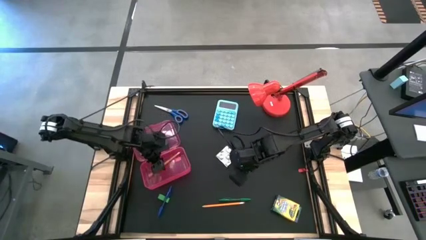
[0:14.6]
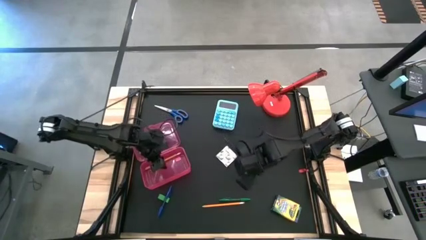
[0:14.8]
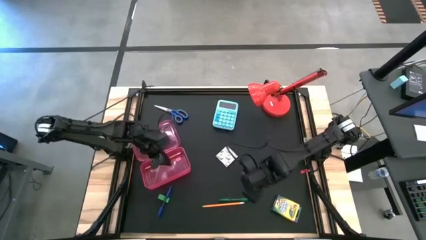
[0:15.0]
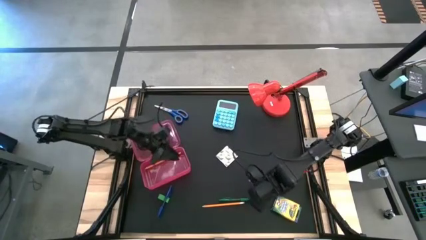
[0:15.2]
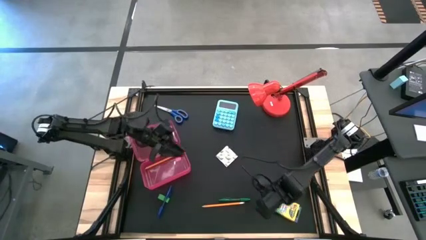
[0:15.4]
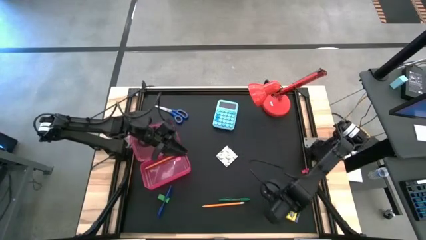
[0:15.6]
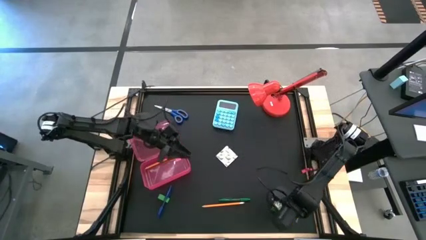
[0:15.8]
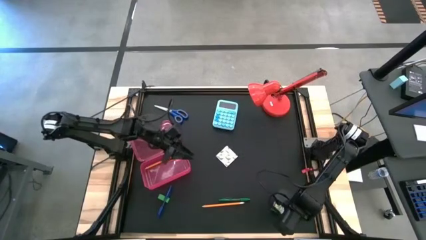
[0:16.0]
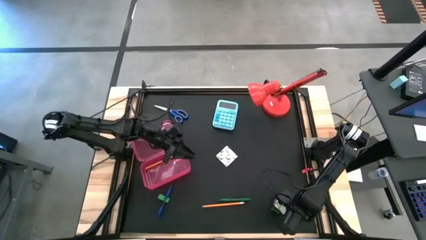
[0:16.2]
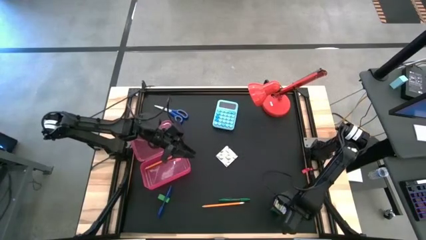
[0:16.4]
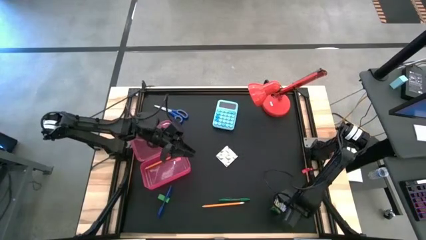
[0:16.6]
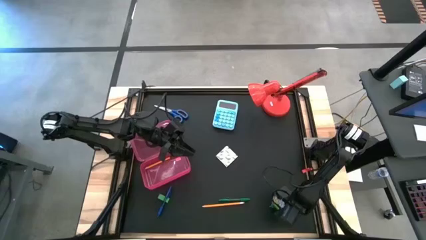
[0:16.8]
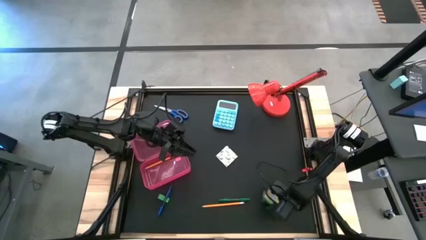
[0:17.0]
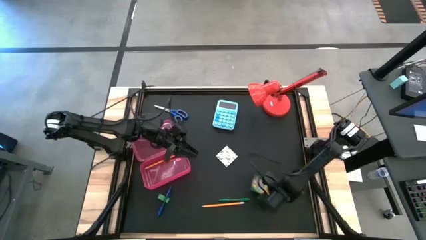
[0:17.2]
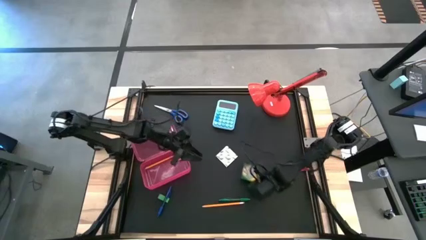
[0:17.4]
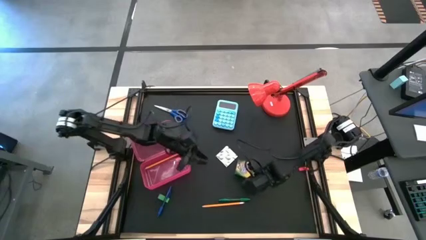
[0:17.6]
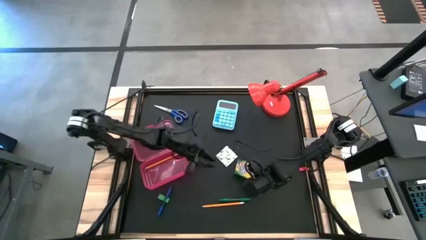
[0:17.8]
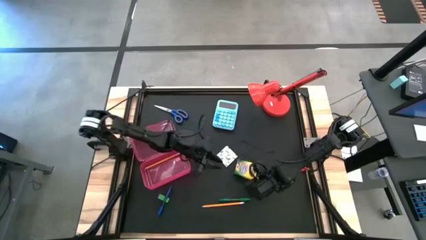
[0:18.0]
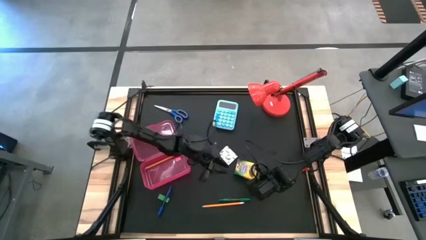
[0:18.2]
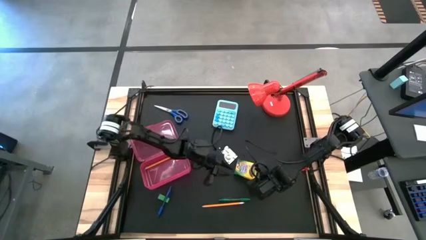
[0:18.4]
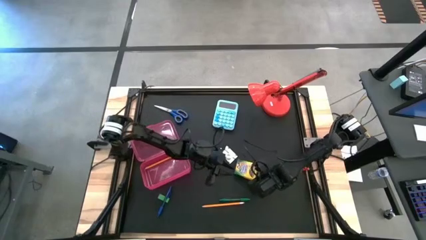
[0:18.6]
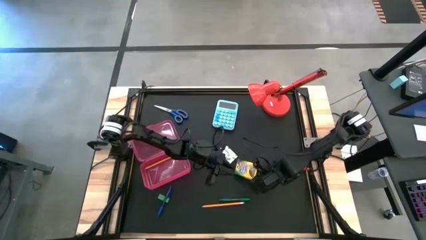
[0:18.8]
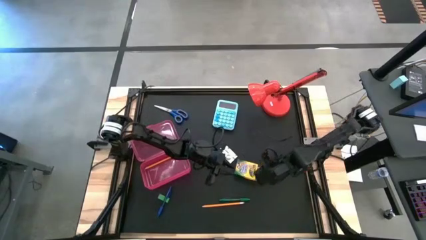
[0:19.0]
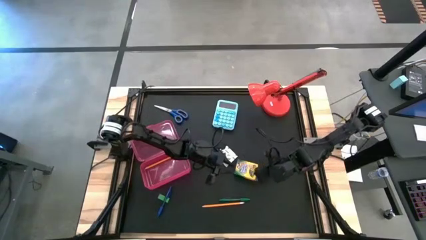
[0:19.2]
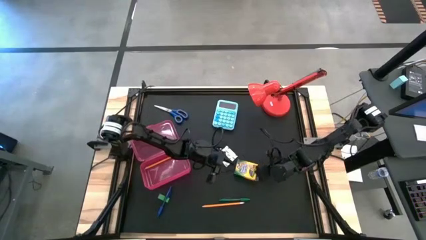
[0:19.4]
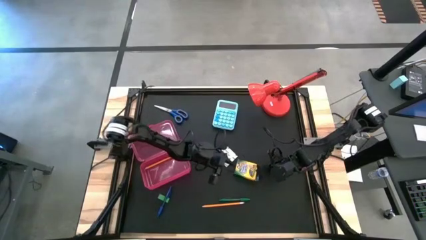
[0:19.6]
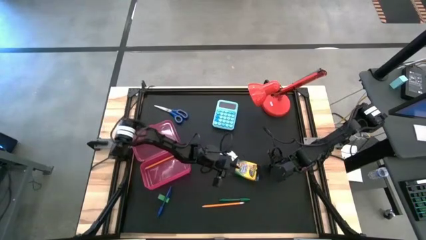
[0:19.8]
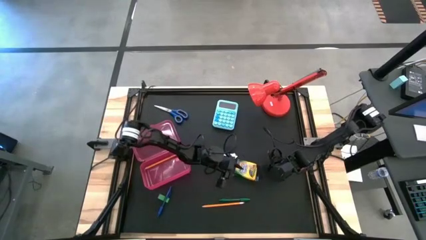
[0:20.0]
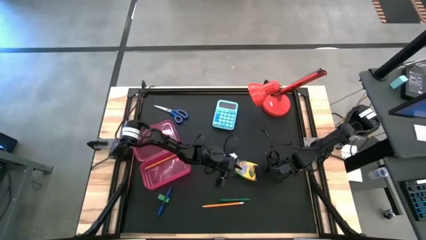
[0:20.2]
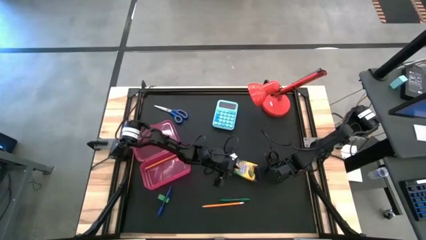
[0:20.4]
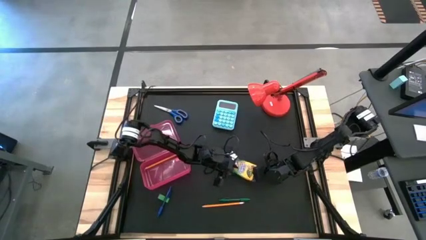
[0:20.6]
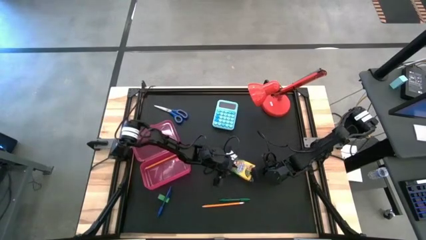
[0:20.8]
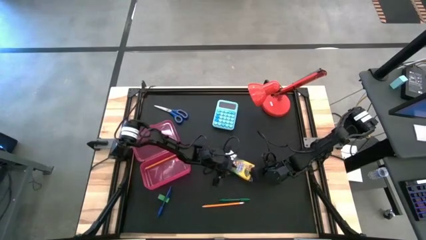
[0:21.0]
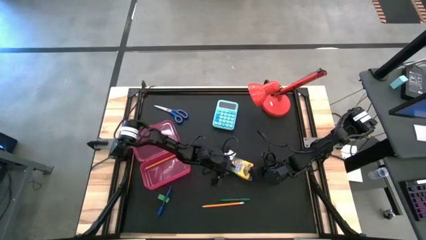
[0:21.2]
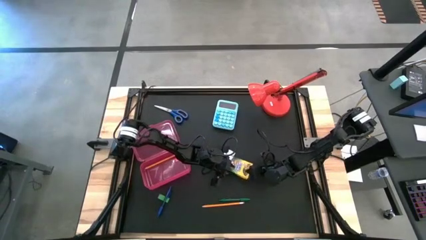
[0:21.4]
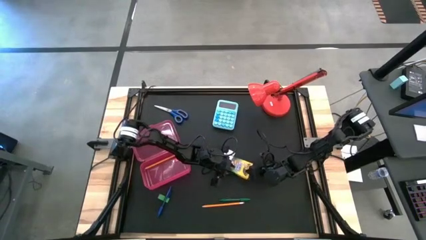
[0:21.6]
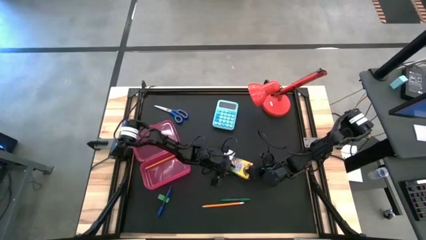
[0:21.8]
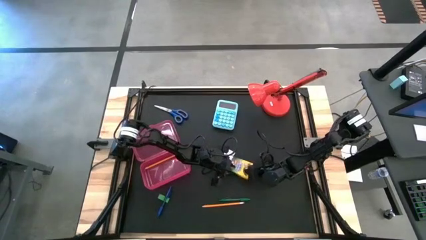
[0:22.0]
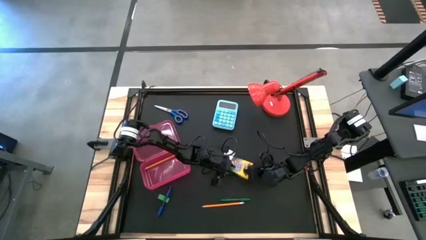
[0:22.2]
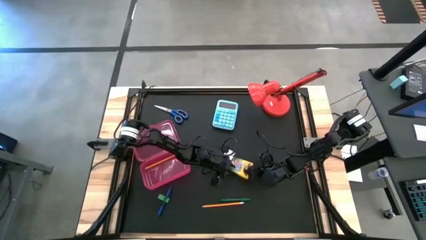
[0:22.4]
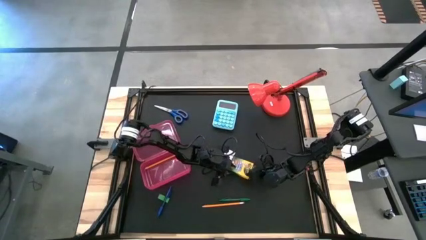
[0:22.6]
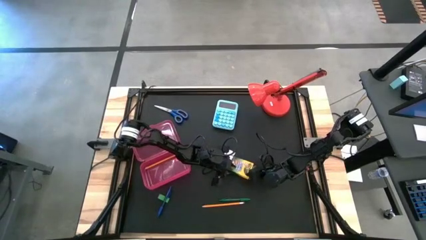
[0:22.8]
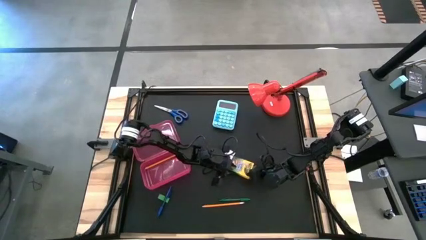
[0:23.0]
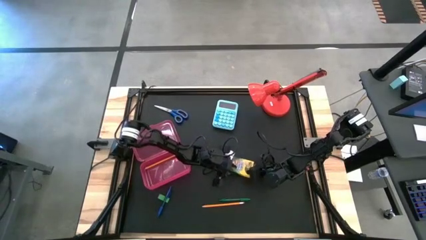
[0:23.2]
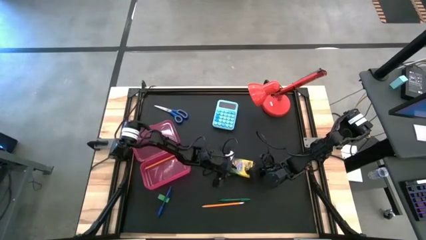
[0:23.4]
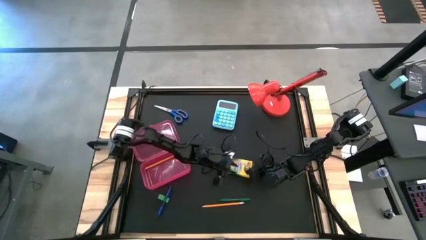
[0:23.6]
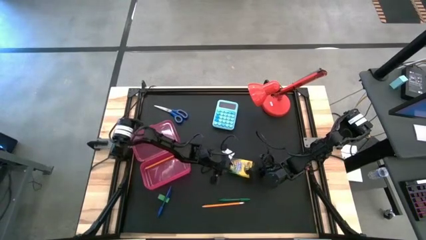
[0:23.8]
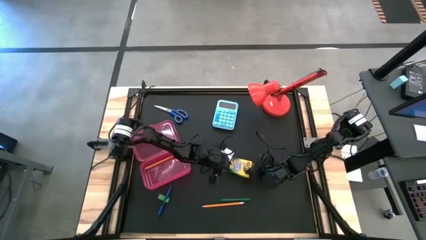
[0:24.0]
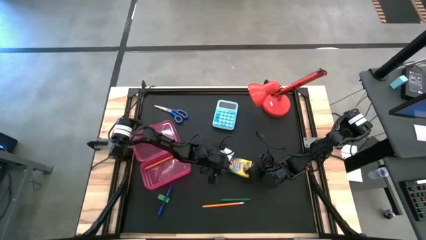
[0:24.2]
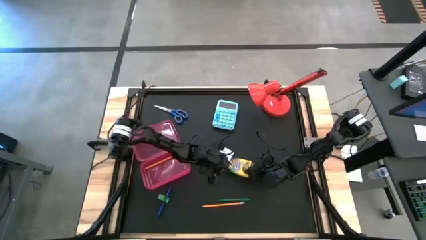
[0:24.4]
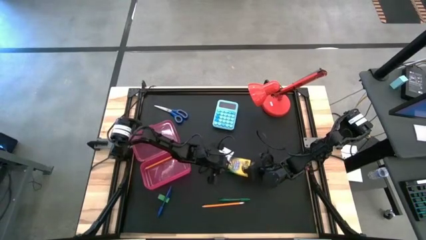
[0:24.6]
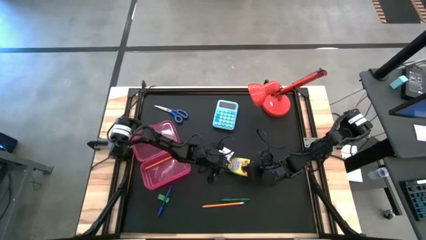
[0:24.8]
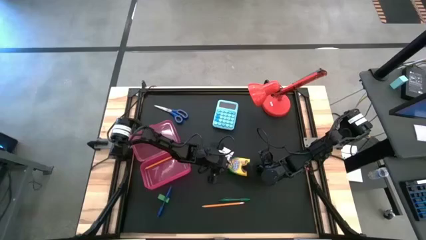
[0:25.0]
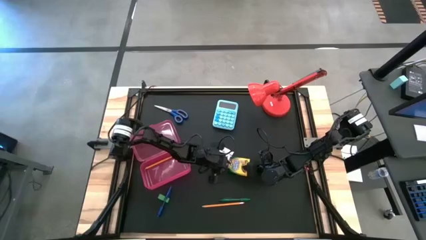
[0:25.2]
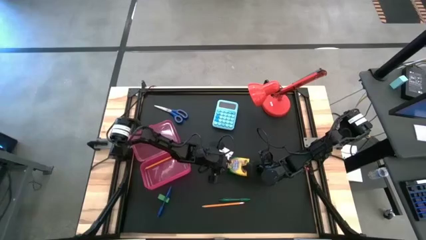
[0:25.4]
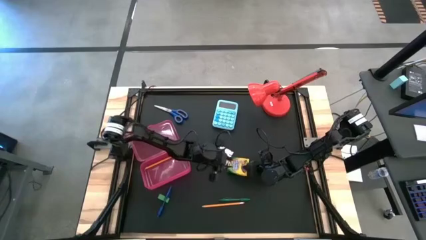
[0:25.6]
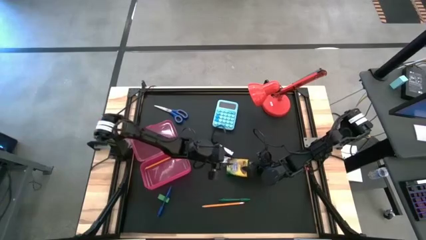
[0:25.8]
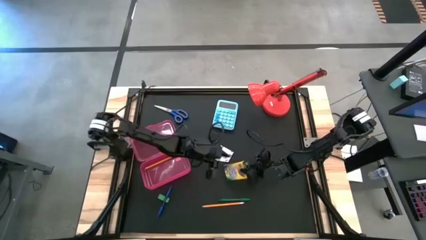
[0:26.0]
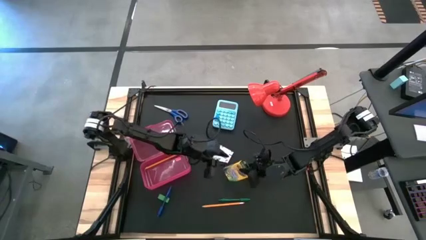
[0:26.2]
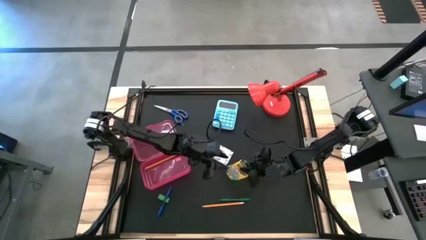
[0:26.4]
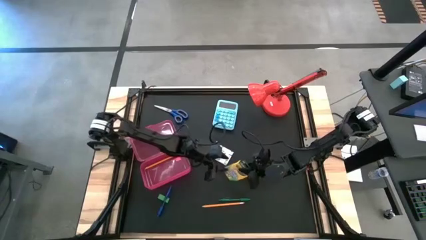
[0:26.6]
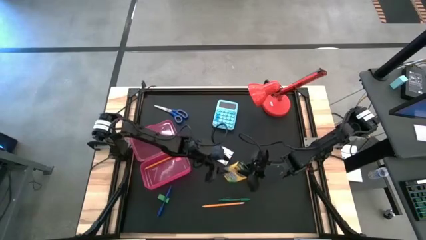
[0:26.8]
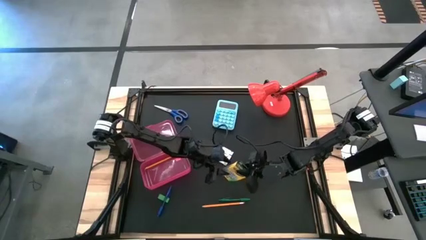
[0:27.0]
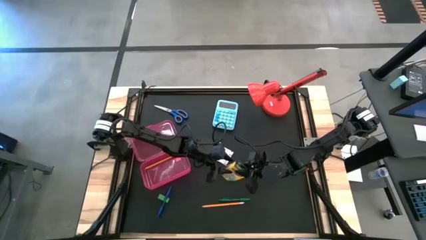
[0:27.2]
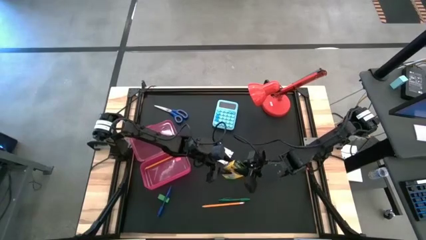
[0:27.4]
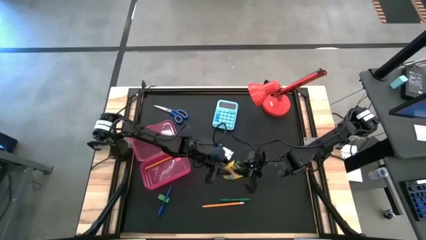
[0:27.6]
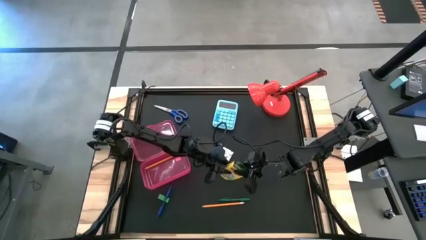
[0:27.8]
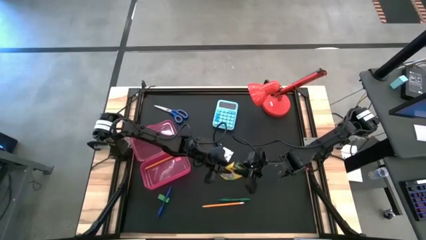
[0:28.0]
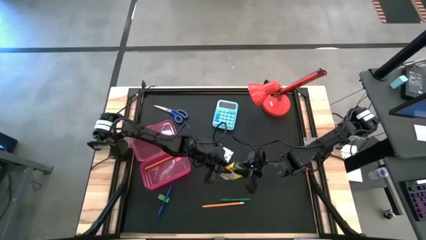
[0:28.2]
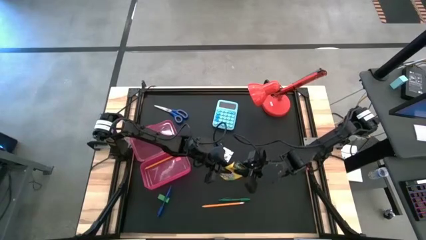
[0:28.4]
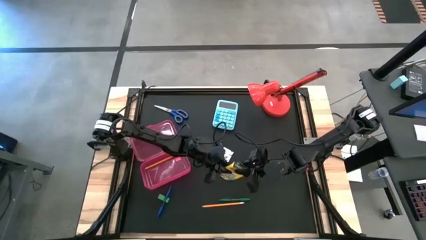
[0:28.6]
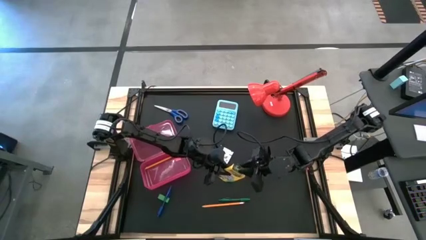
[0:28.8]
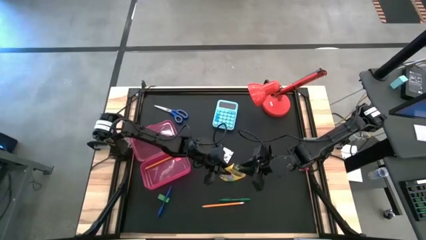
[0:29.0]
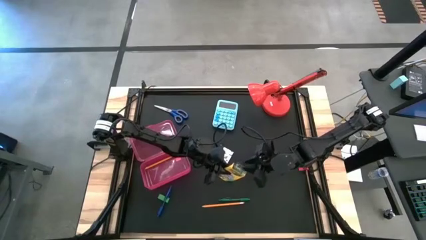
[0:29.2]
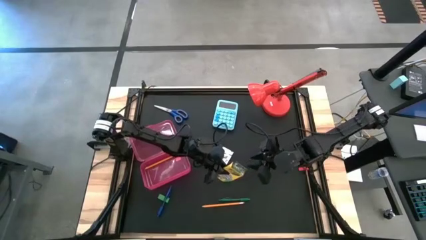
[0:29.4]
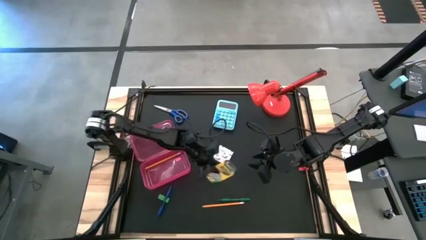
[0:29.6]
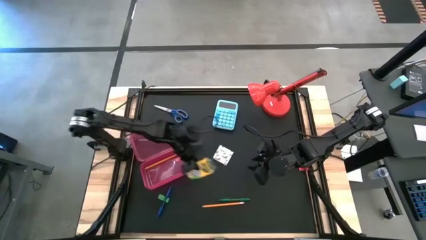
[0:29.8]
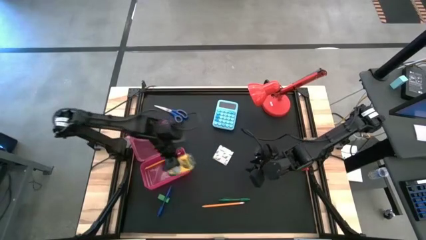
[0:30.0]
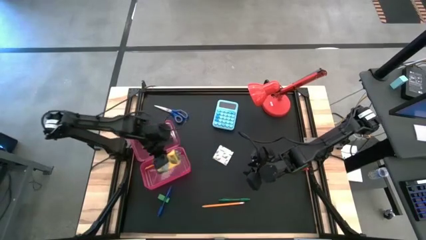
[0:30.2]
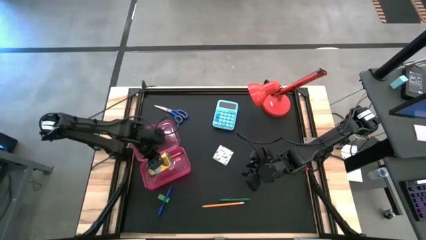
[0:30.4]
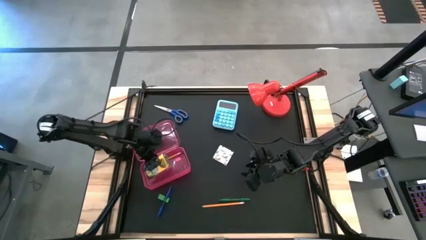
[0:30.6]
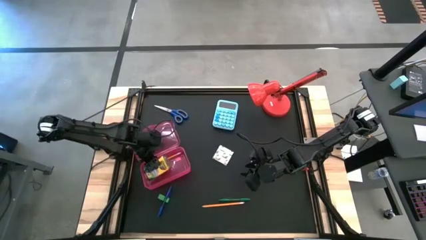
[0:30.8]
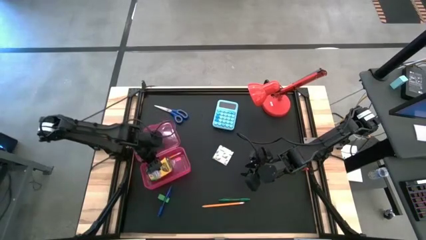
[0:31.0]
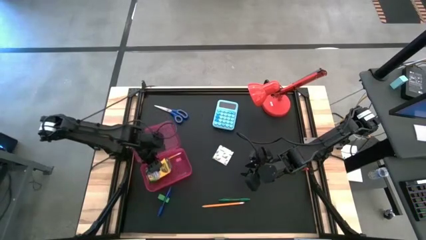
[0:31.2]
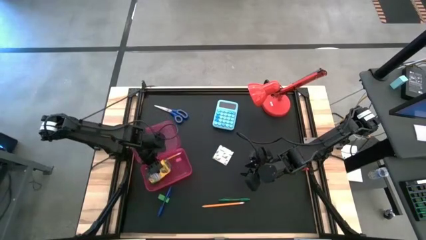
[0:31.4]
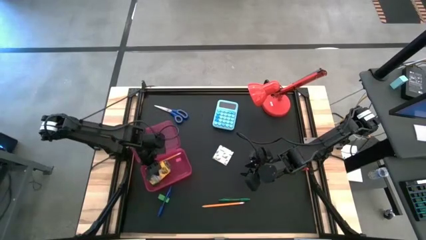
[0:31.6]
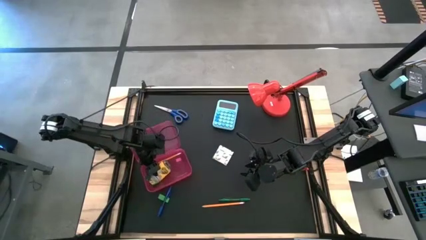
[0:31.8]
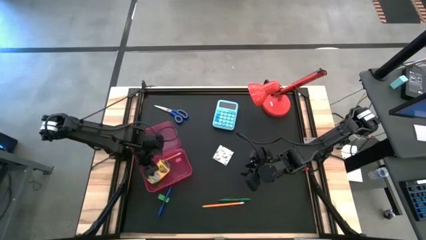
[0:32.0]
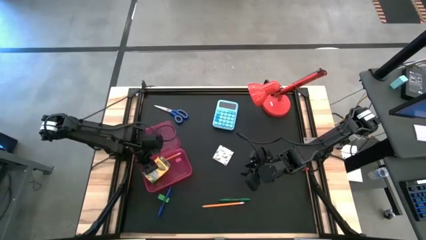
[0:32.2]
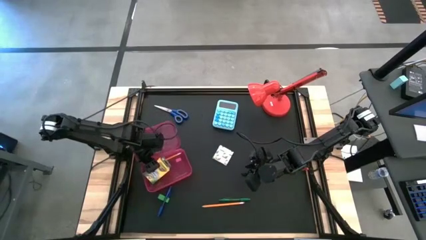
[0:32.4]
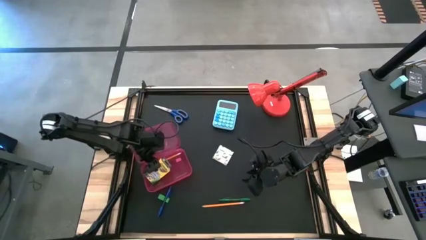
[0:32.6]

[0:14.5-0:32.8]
Task: Pack school essentials
Put the yellow crayon box into the red supply box
